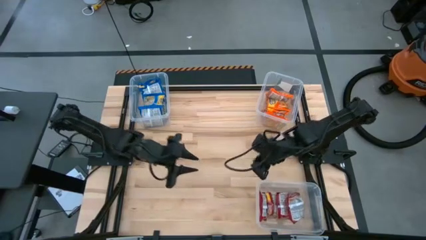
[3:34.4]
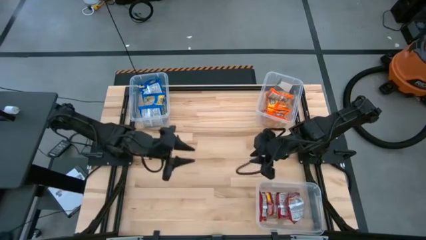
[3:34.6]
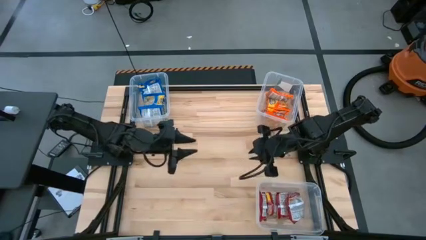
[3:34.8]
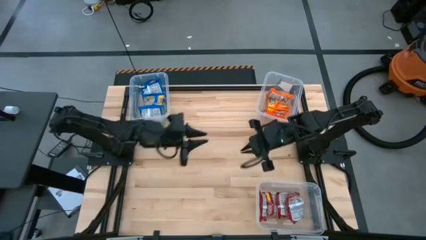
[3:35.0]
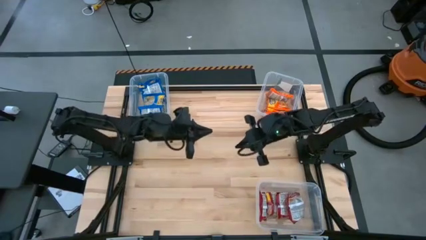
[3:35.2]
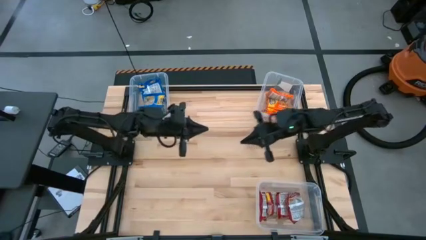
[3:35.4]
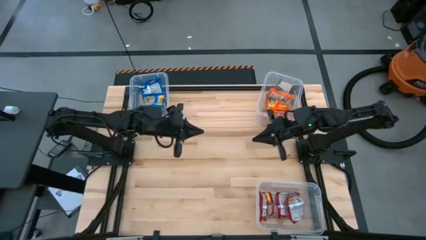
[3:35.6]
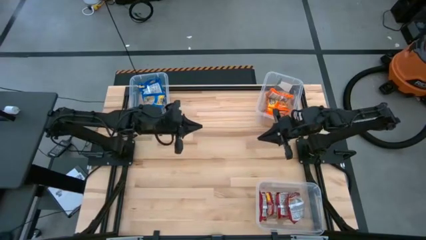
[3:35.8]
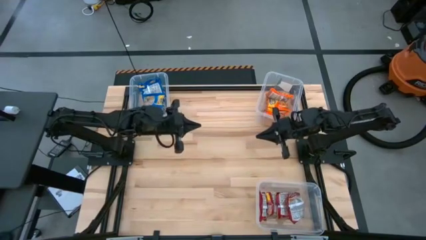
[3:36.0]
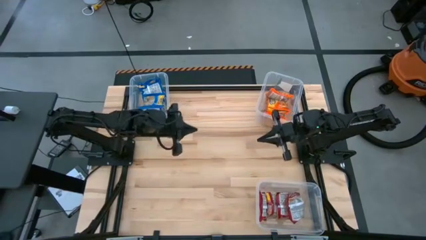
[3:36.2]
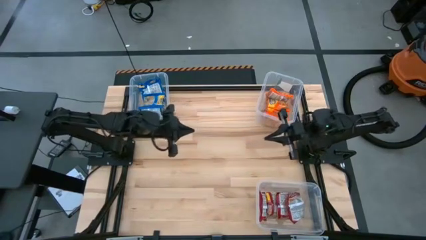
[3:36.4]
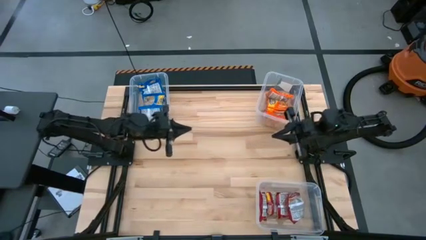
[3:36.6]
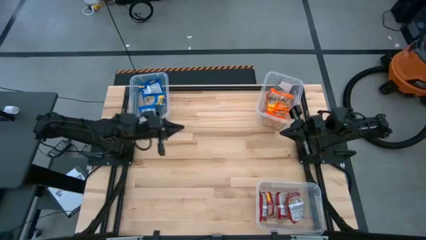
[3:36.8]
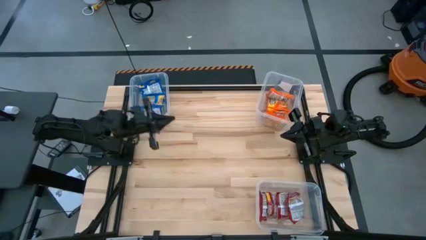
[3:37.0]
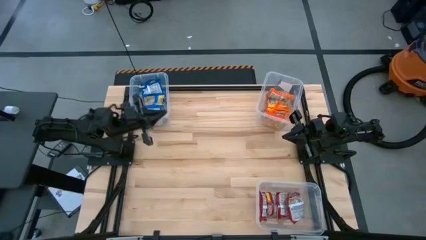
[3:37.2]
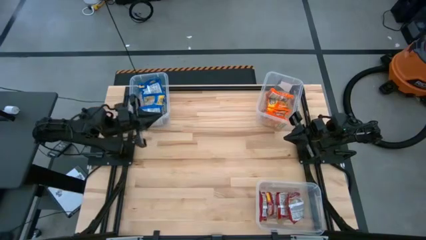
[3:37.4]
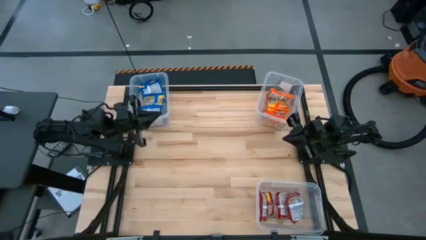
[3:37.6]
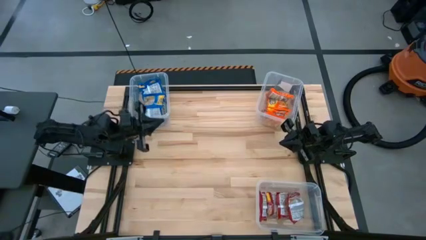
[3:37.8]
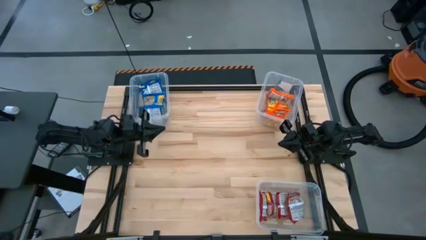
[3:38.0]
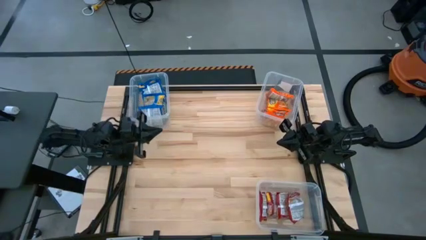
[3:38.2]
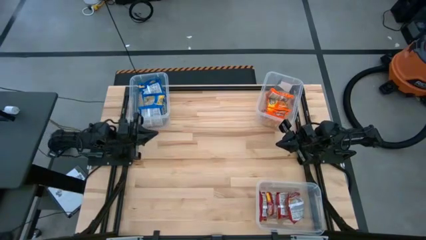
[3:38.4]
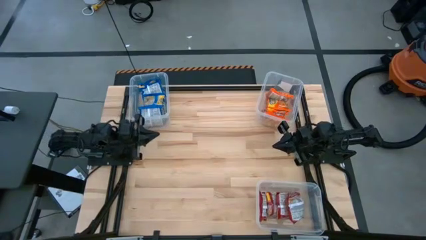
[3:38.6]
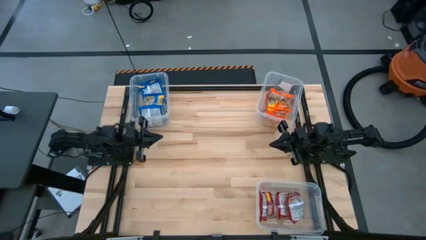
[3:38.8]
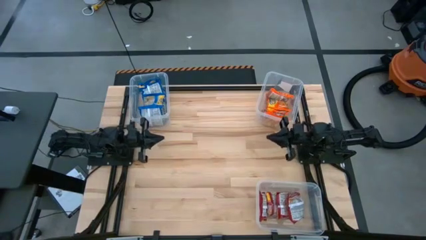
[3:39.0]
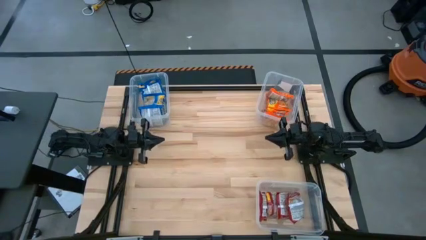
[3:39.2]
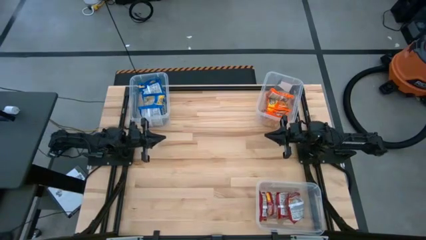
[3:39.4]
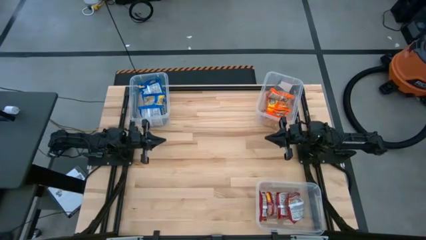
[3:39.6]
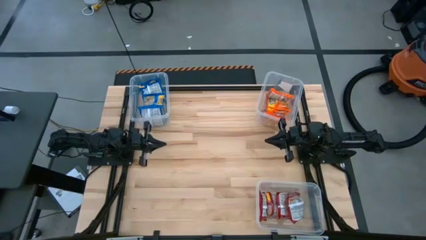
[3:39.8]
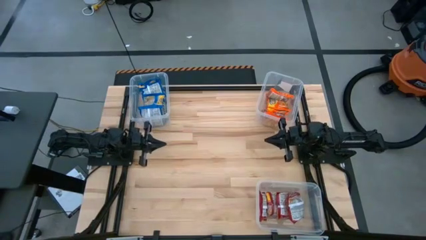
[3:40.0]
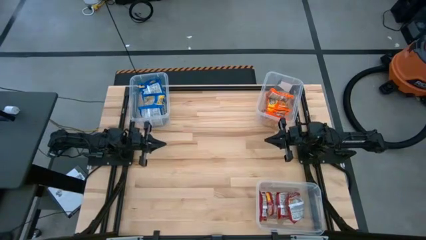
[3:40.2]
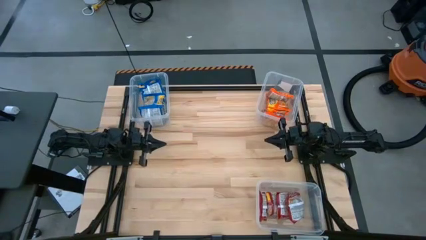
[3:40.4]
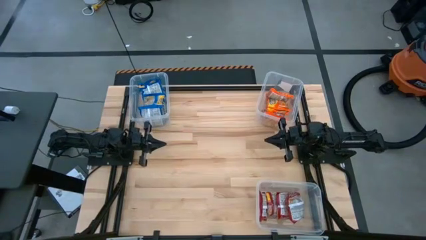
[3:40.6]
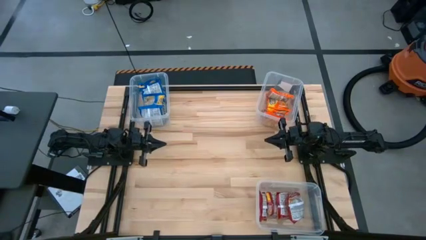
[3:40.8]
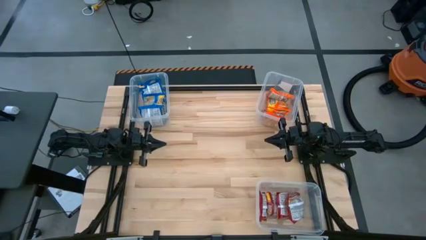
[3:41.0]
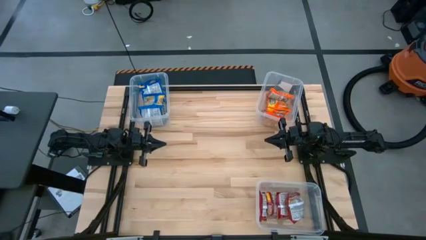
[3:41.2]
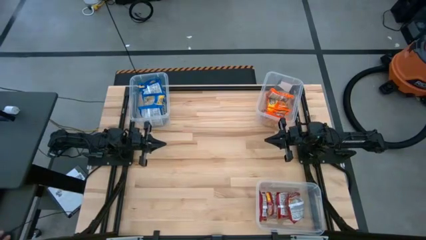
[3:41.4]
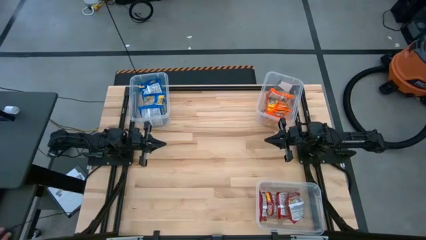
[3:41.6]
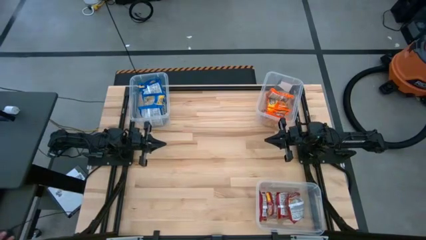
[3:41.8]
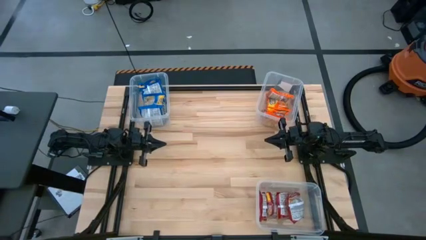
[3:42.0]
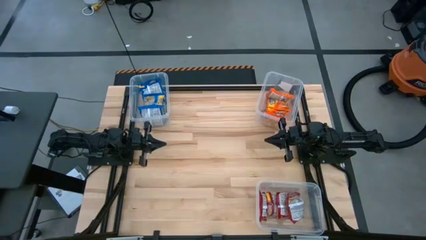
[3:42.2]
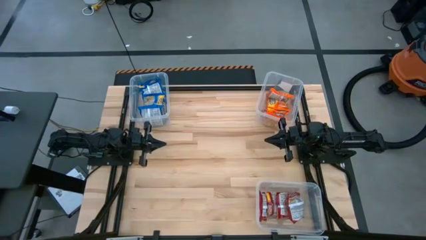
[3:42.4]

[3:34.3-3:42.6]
Task: Sort Maruchan noodles
Return to Home Position

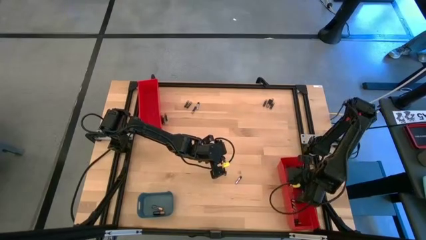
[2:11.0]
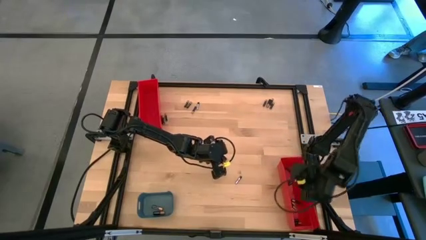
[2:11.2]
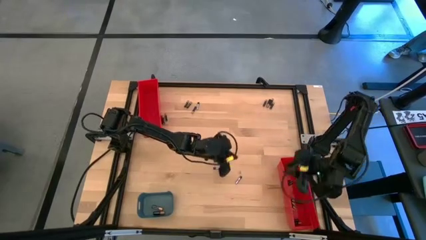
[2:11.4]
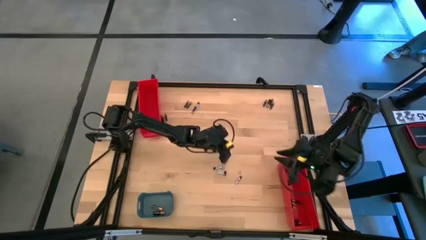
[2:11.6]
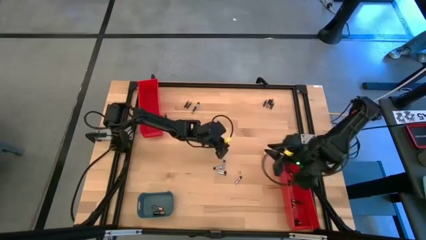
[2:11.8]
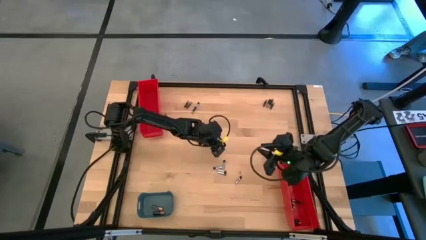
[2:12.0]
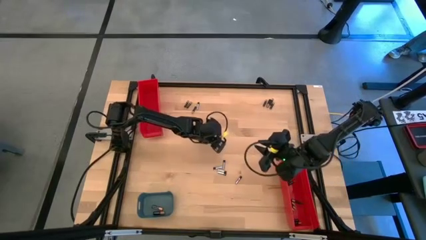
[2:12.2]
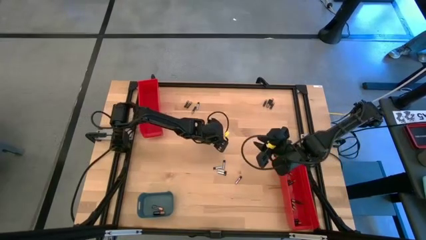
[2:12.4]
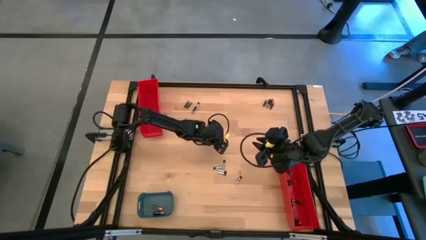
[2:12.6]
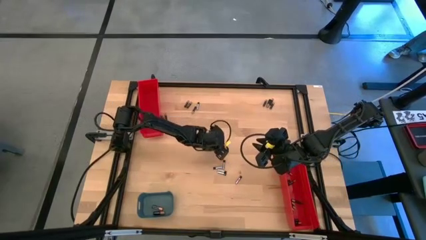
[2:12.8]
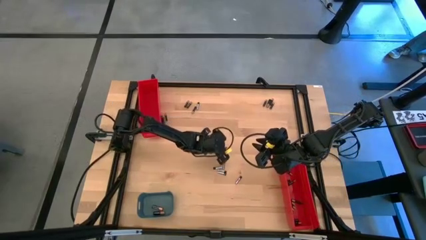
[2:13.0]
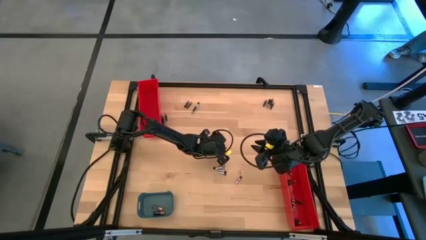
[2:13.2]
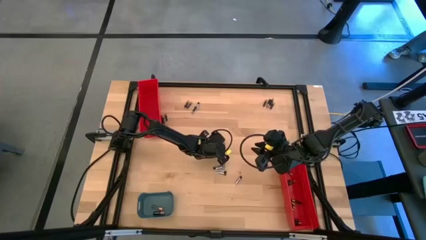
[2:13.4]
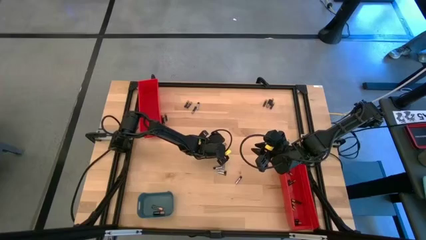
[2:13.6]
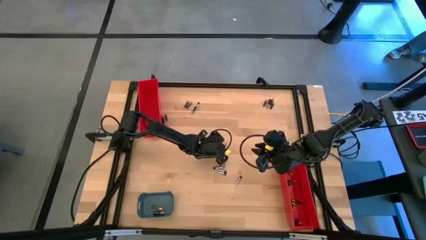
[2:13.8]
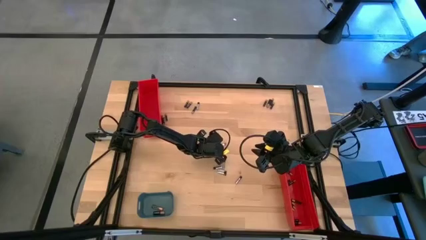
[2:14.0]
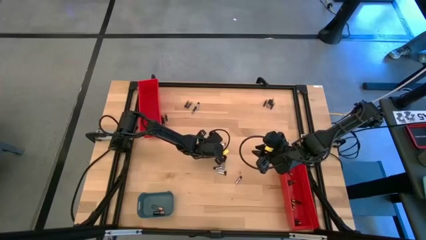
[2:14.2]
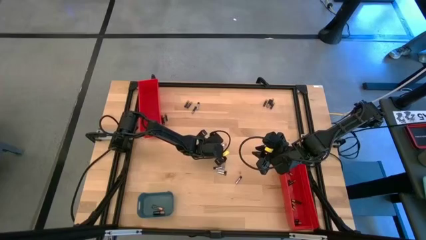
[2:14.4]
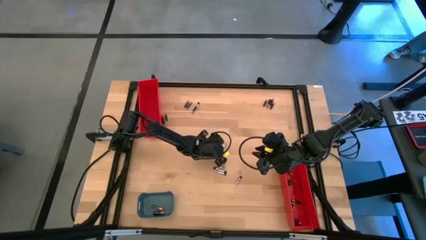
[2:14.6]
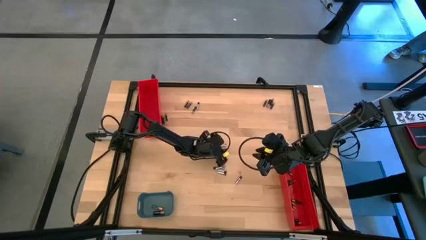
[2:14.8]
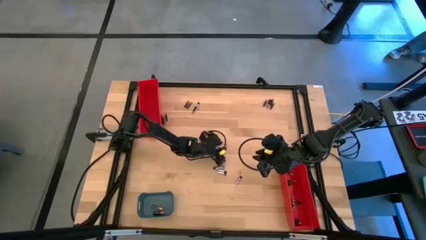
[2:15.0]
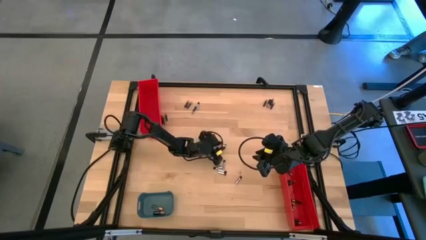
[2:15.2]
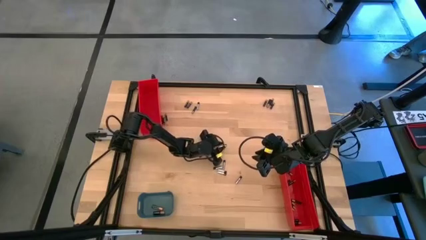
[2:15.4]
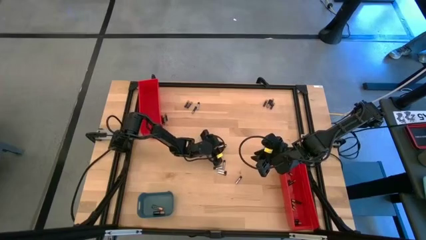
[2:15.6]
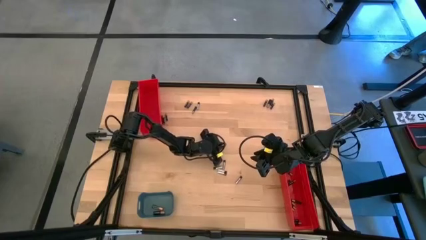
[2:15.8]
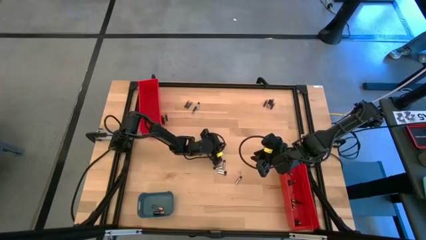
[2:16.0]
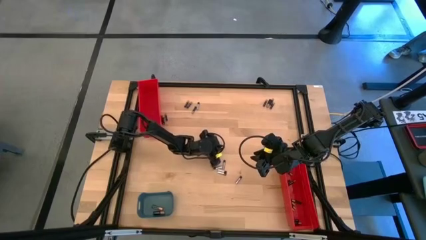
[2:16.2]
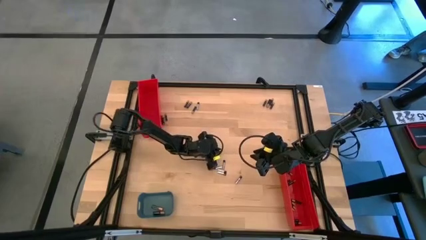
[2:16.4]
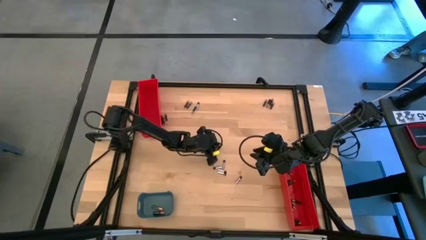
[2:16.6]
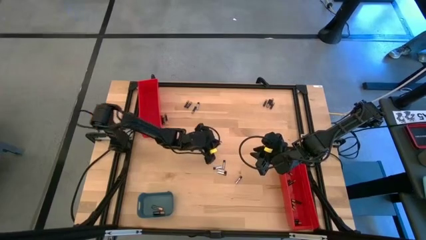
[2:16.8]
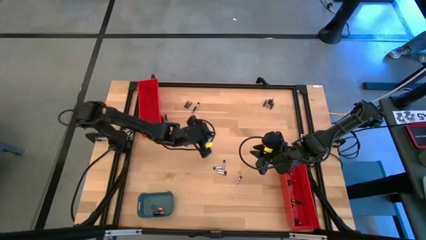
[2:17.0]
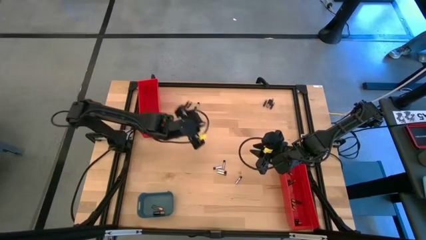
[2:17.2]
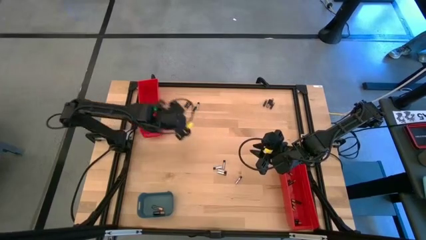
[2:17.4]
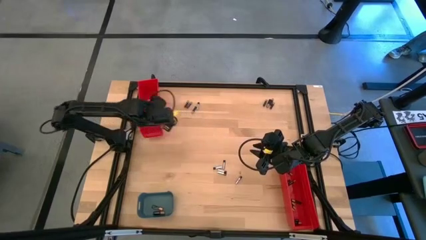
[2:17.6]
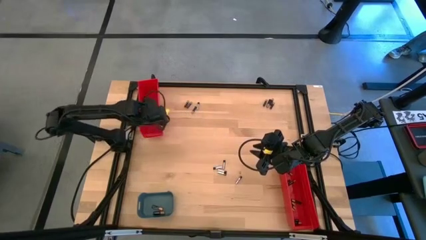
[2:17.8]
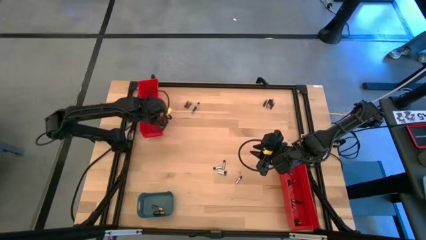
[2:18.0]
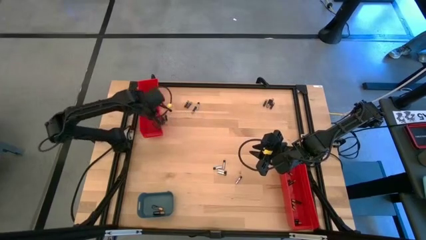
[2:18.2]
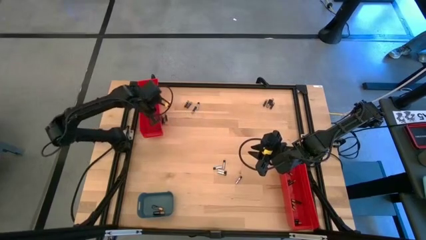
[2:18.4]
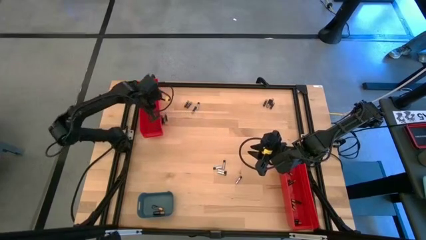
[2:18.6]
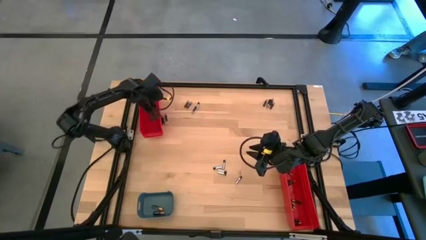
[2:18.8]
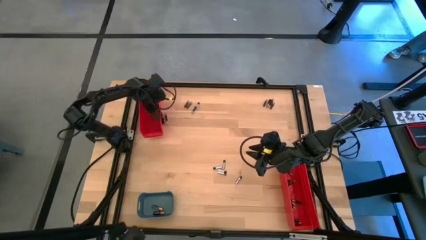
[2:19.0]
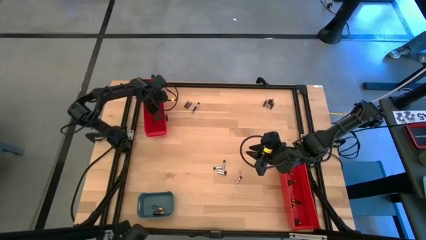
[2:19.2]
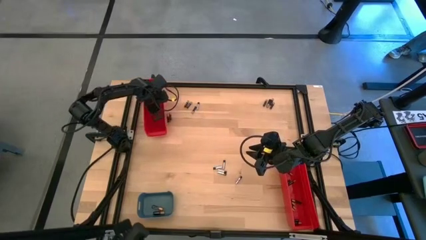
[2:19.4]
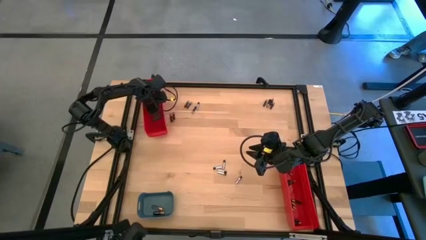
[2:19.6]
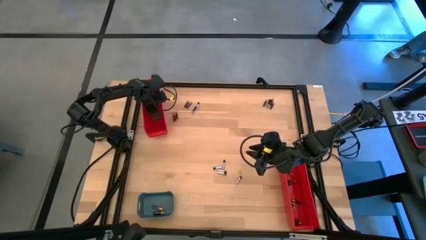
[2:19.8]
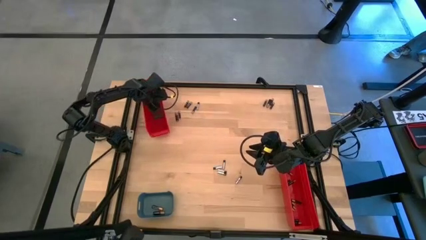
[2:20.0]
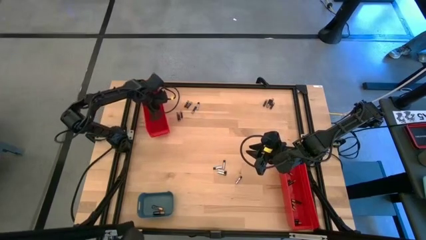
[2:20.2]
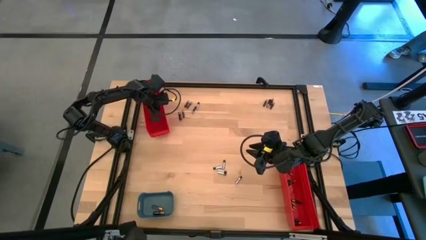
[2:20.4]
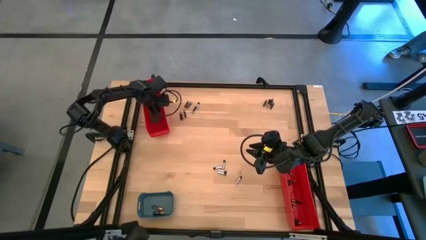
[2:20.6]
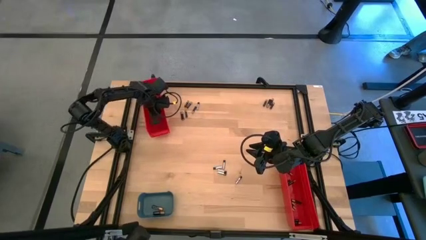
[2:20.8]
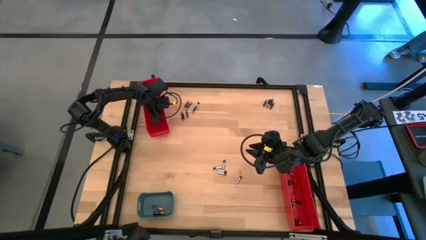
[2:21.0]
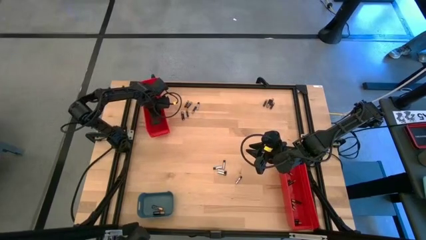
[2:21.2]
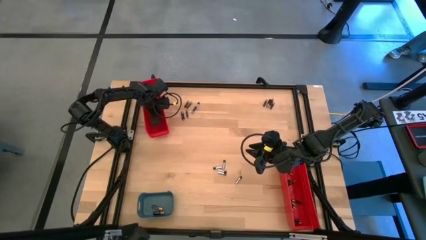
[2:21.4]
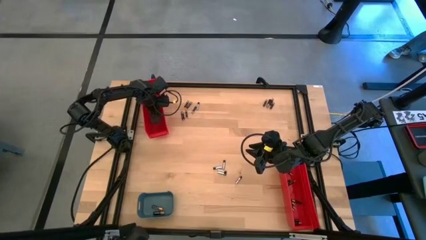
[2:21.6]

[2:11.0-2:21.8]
Task: Sort batteries
Put the silver battery into the top red bin
